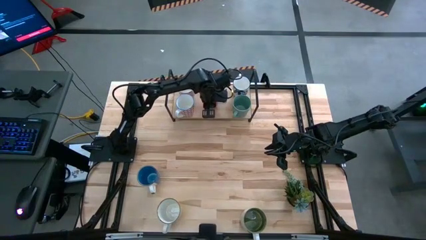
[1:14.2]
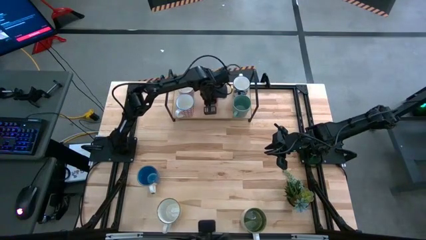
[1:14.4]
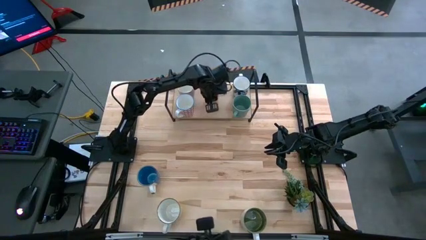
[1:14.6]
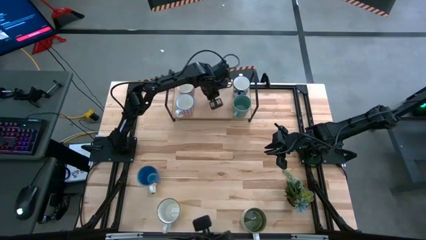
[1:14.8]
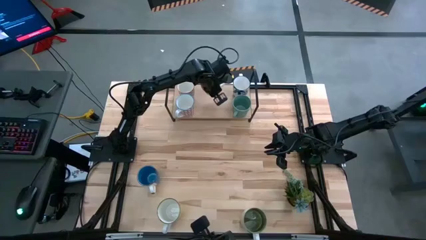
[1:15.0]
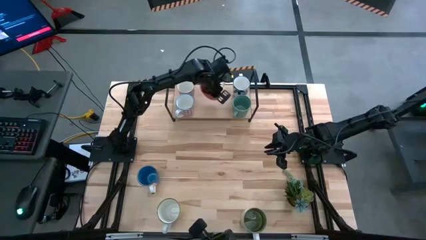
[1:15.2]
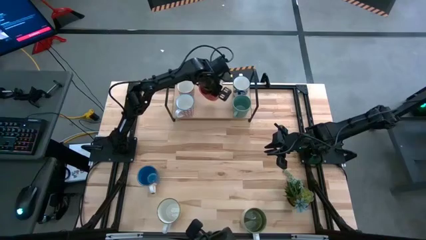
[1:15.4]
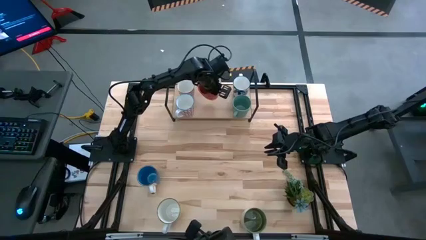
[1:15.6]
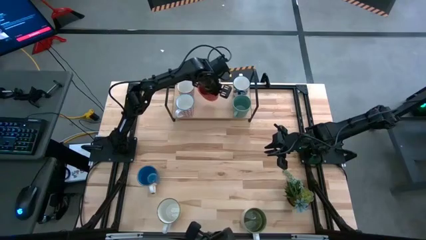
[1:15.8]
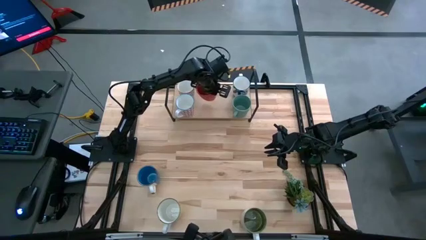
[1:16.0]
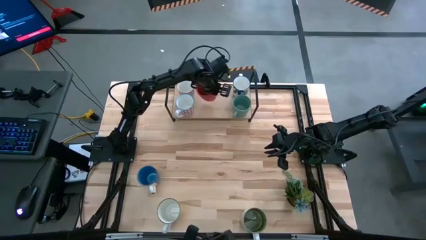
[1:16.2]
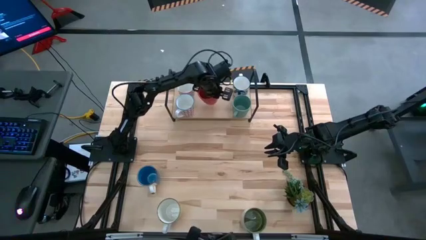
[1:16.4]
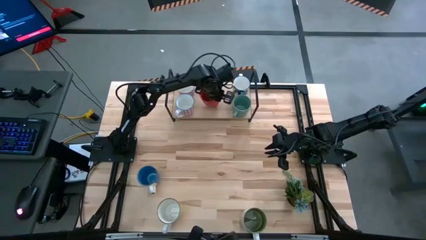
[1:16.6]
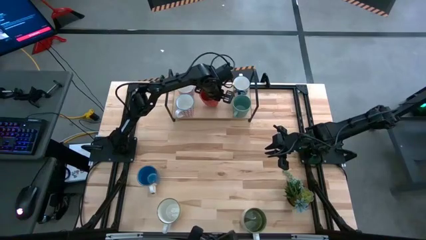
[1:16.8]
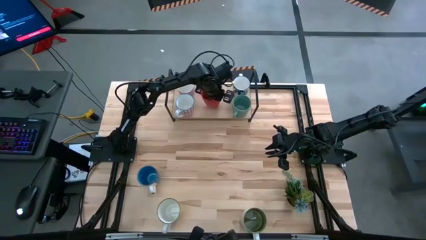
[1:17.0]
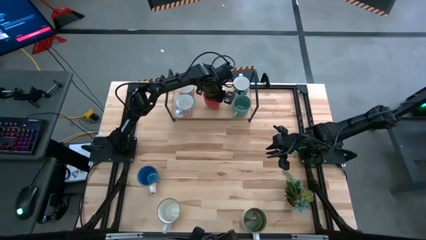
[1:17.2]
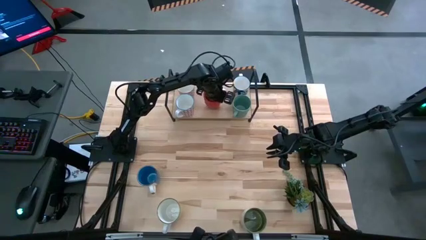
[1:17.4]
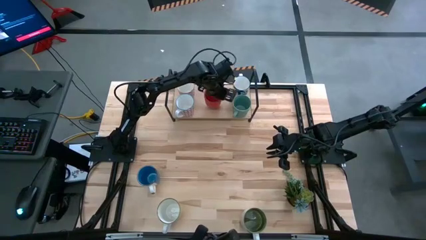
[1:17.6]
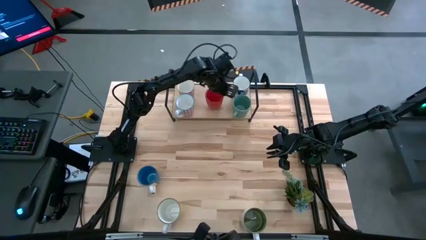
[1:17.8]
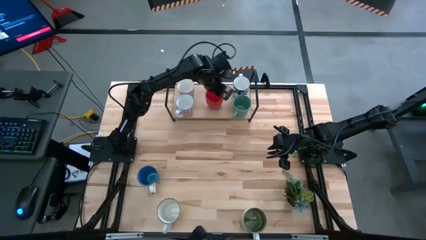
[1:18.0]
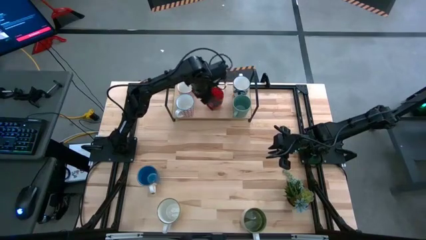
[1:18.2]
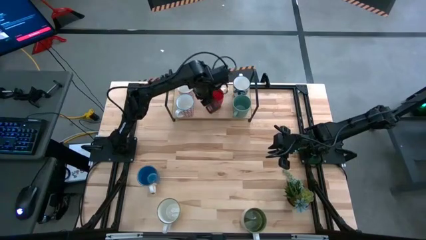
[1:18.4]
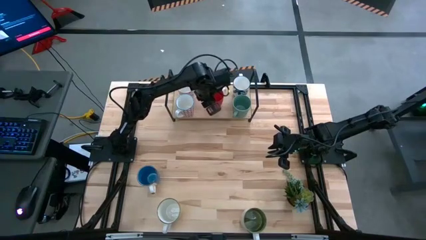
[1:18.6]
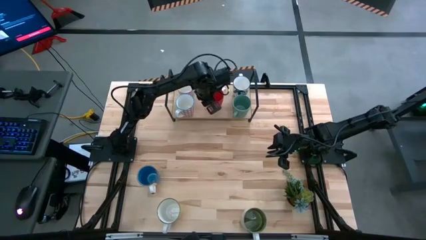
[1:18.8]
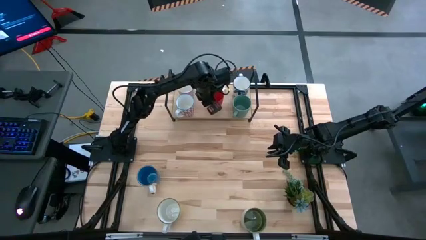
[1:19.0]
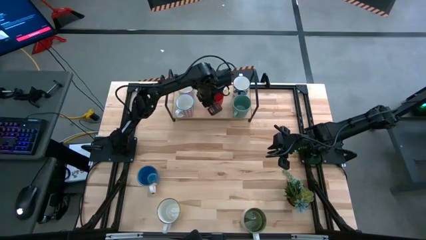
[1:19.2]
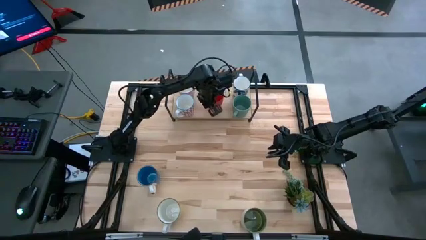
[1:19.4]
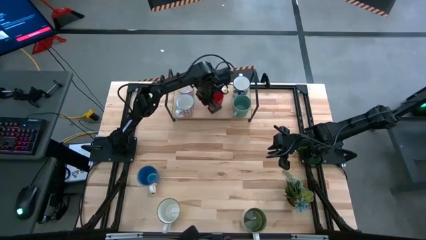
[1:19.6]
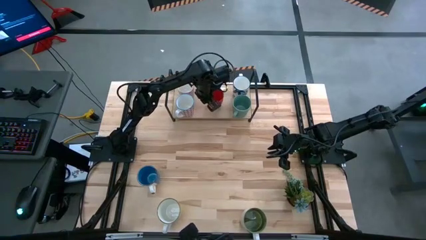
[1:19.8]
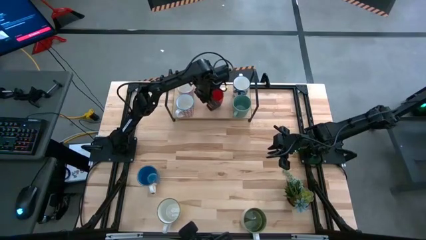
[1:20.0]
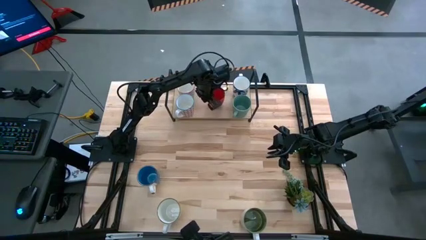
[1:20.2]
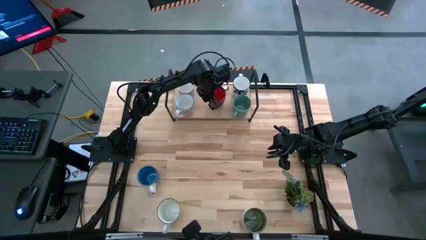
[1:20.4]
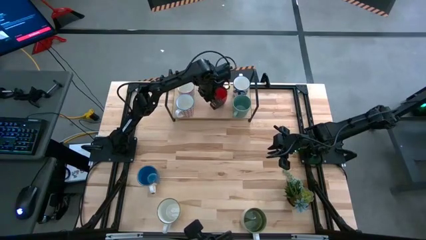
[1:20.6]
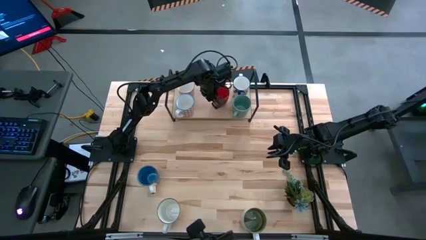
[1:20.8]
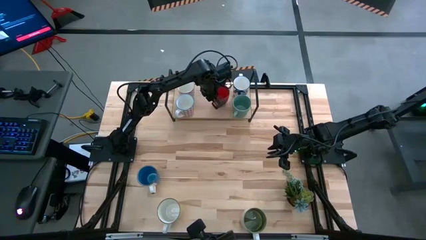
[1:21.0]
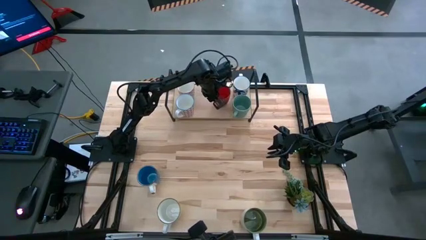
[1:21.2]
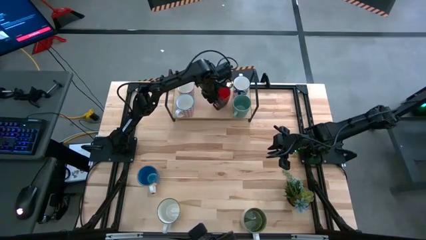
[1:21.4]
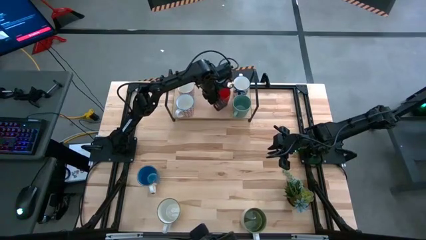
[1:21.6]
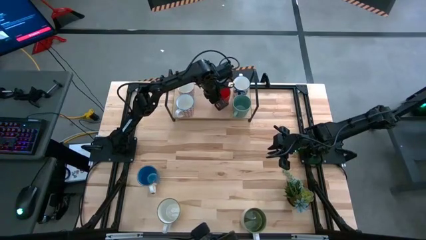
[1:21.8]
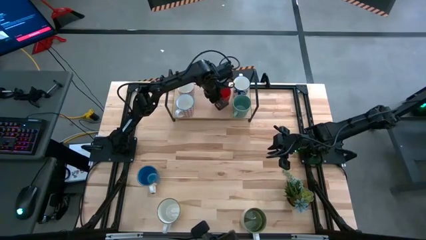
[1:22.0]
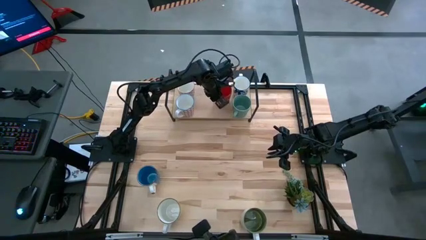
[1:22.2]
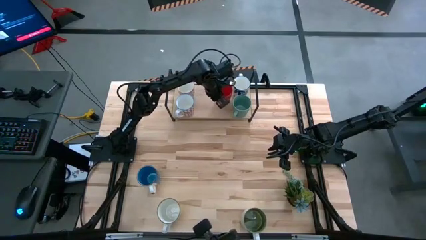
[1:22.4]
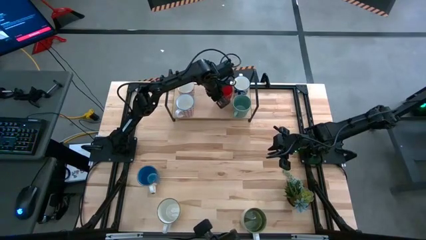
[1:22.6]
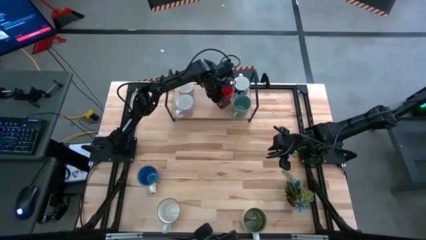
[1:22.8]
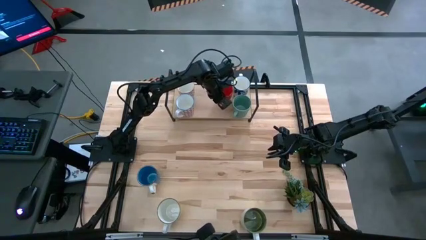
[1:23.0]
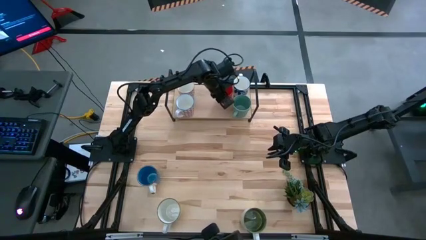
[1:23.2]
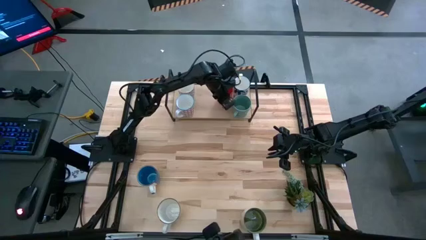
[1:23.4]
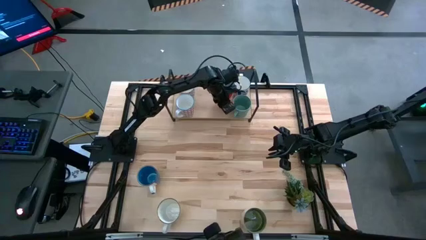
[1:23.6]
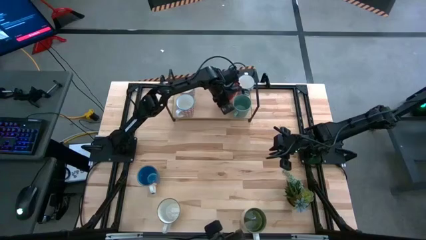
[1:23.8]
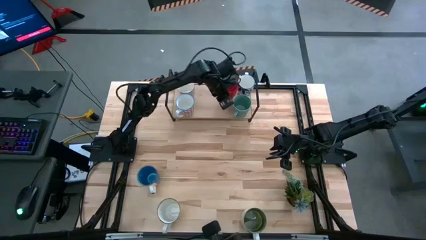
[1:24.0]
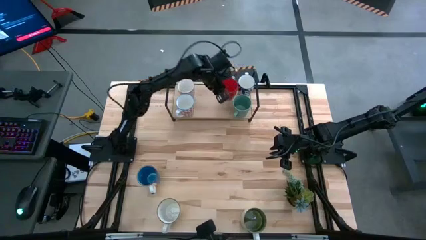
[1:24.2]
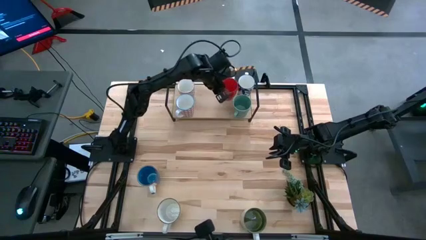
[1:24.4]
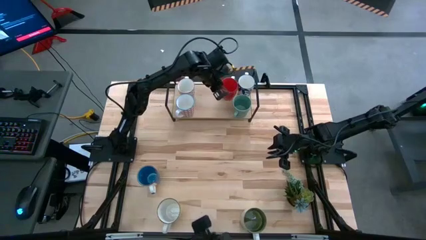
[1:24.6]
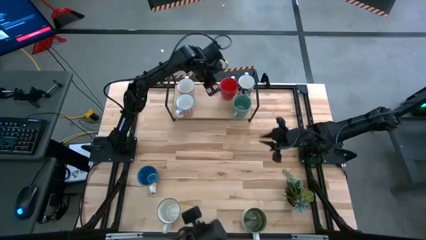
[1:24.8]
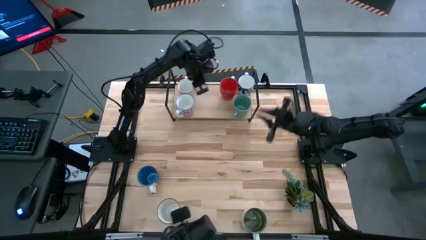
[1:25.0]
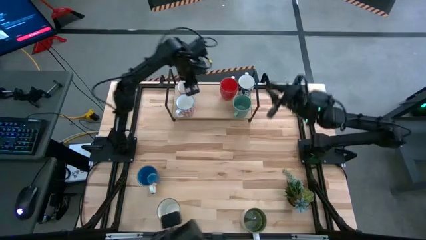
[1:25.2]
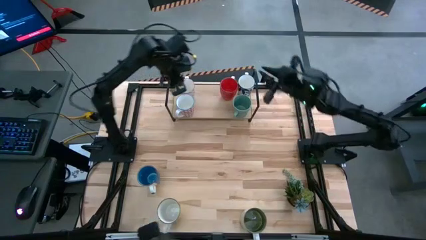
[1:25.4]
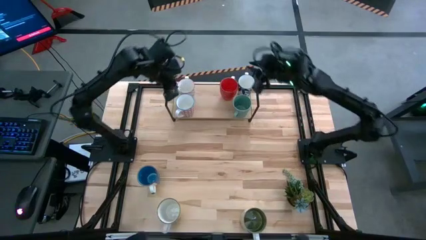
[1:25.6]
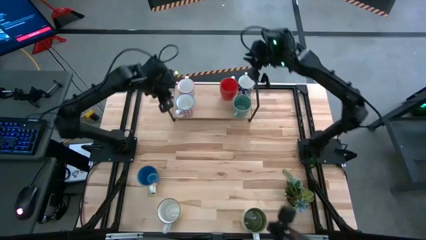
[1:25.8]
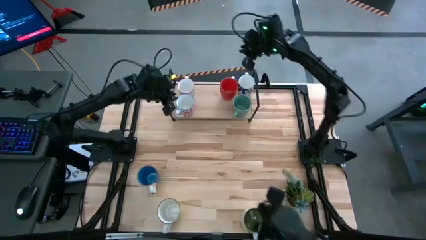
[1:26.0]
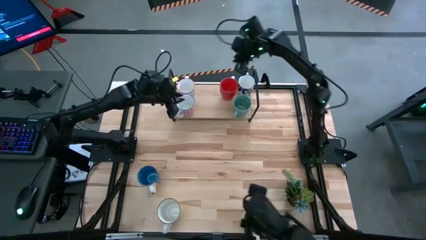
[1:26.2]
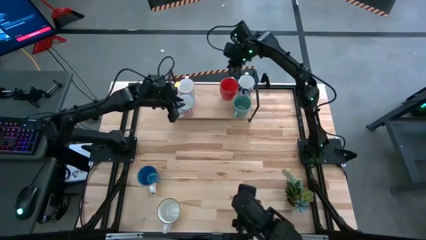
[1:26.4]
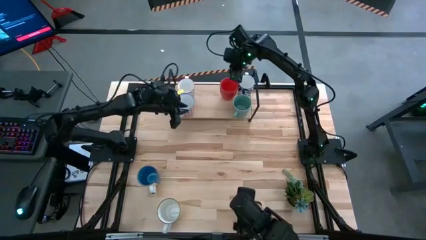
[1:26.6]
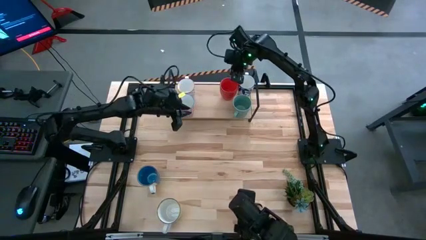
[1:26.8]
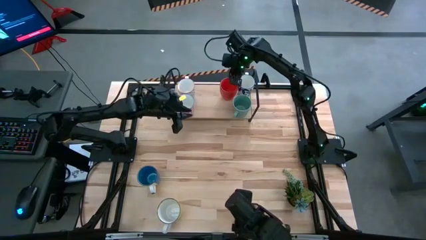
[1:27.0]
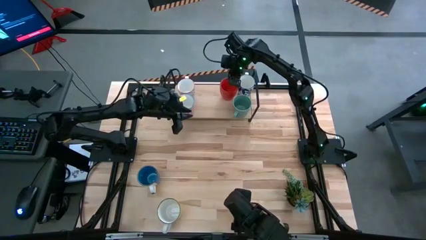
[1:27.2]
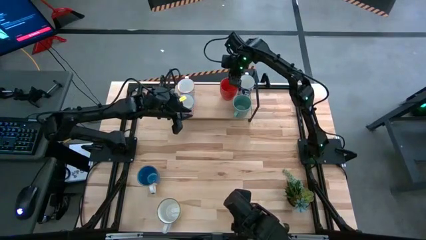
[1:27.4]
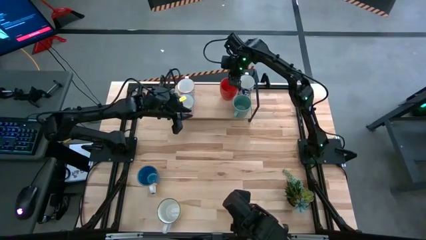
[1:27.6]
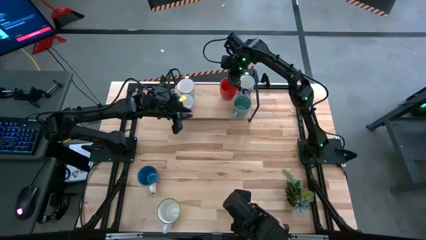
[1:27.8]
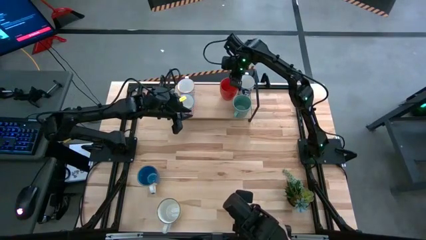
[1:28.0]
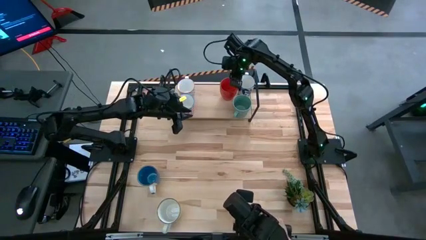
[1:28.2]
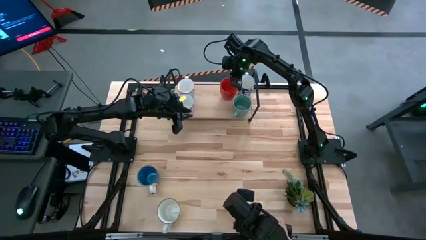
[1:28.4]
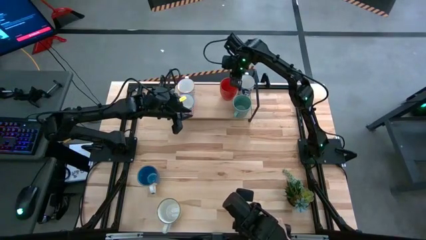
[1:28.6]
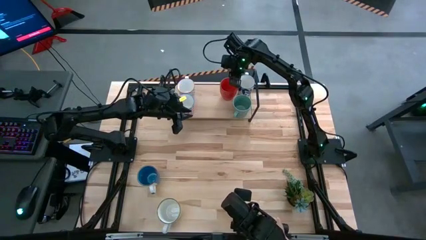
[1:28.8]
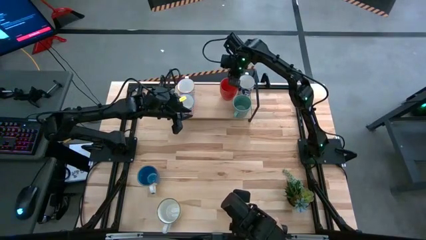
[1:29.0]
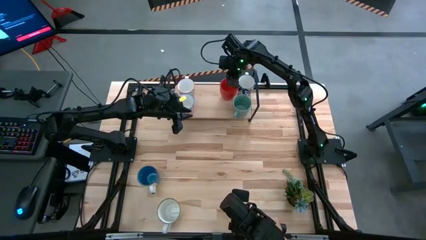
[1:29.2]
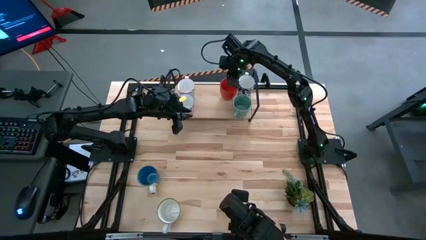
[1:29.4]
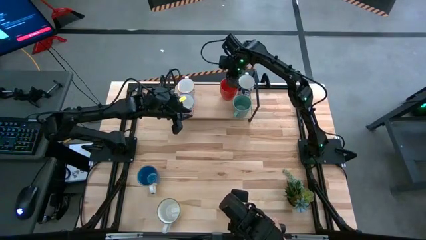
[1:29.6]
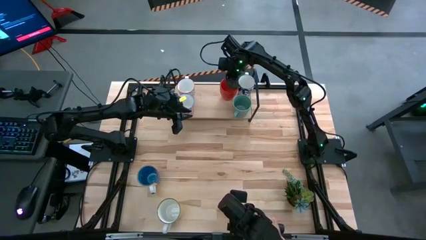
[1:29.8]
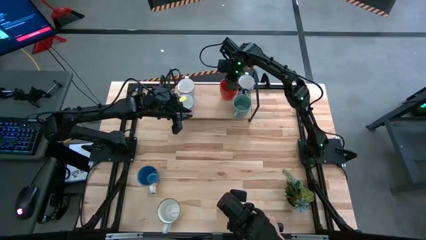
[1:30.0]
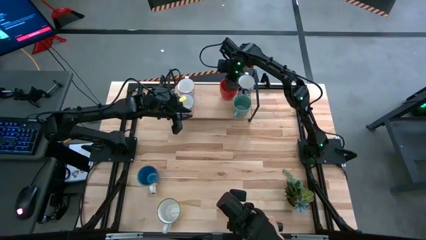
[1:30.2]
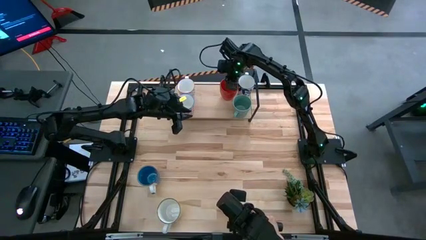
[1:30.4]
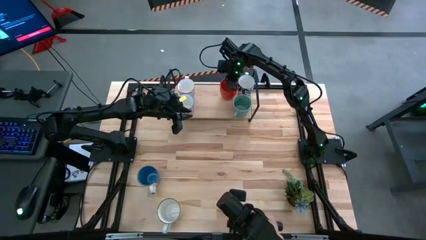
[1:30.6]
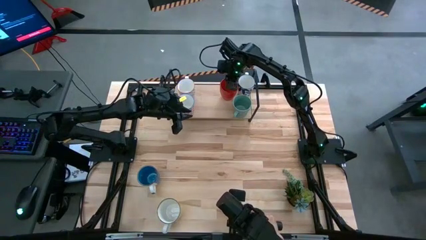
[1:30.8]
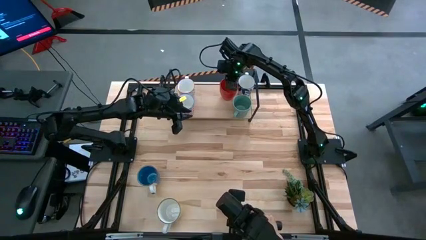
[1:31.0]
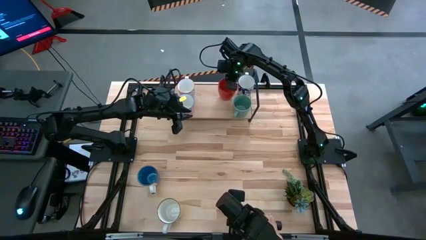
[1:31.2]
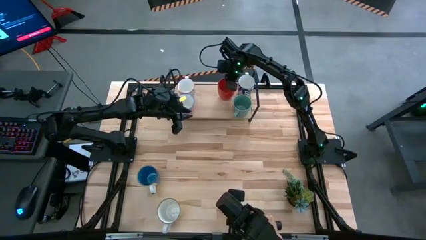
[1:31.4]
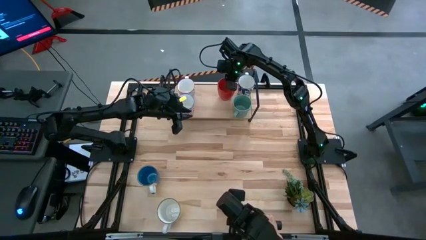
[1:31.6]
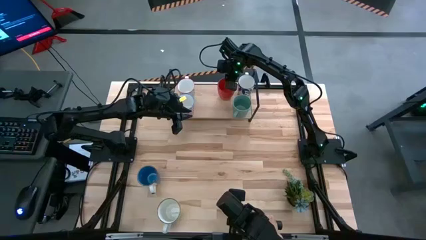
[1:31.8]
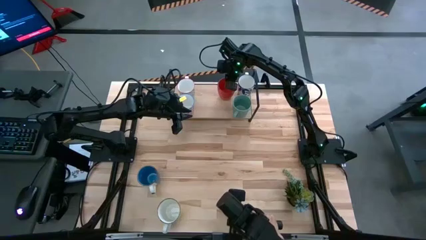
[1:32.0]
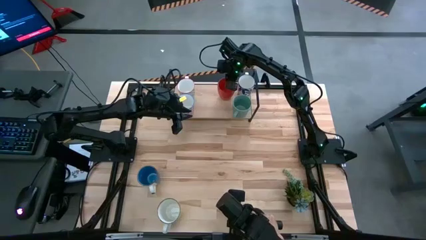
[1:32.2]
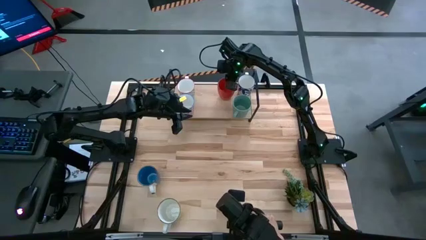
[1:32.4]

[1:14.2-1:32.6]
Task: Place coffee mugs
Put the red mug on the shelf
